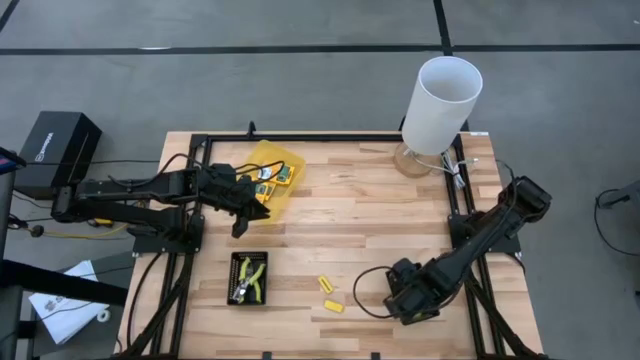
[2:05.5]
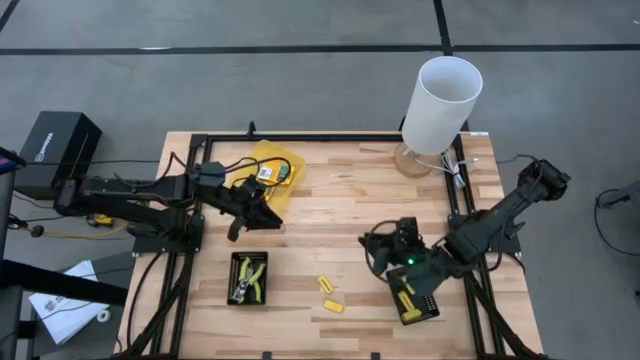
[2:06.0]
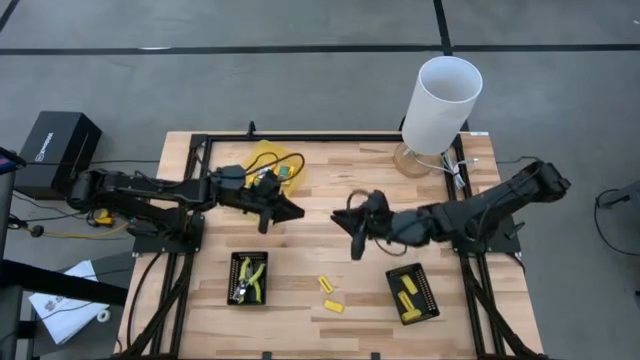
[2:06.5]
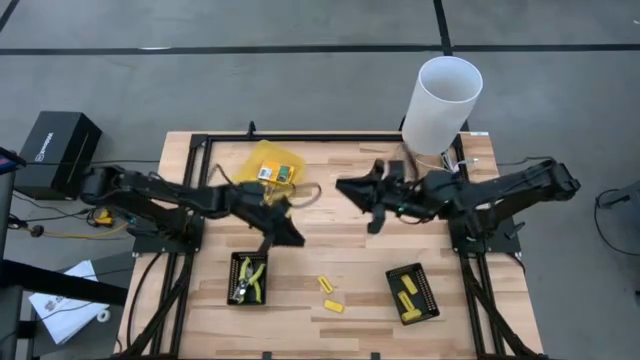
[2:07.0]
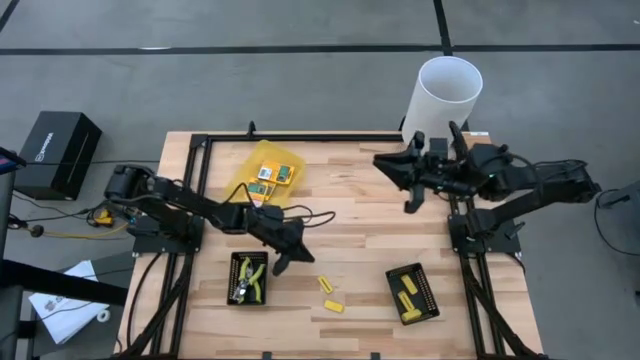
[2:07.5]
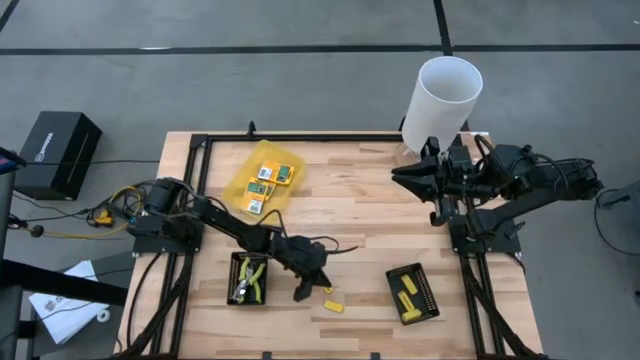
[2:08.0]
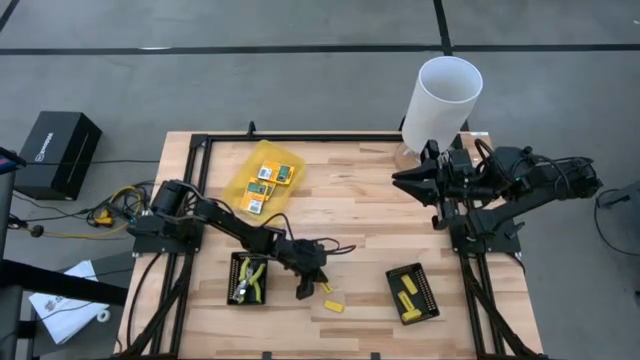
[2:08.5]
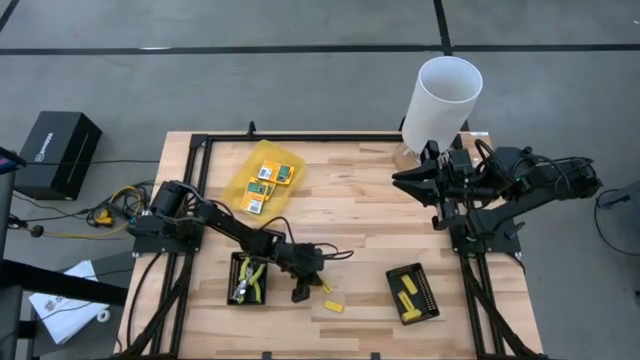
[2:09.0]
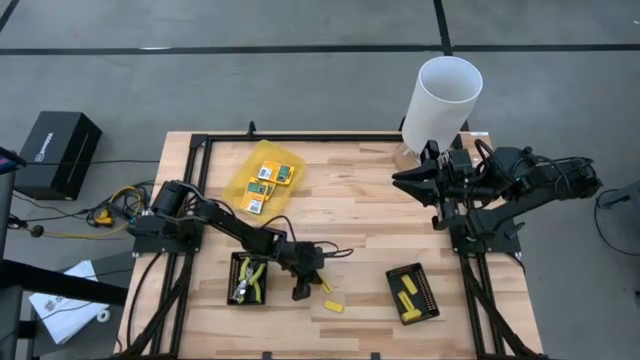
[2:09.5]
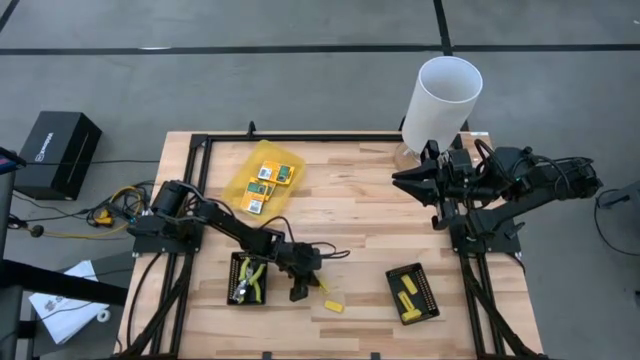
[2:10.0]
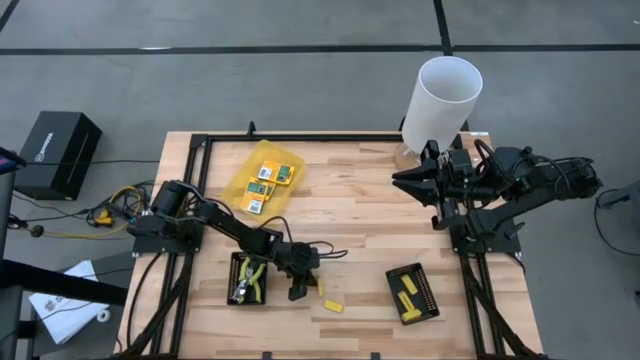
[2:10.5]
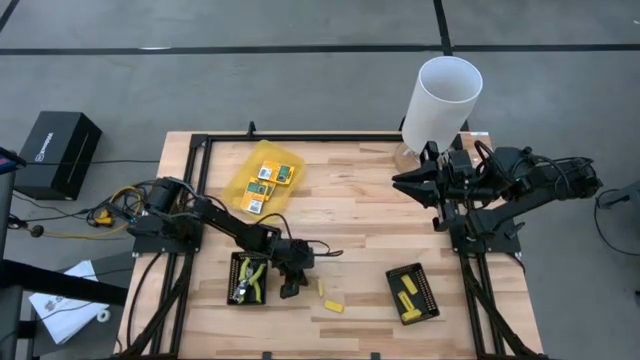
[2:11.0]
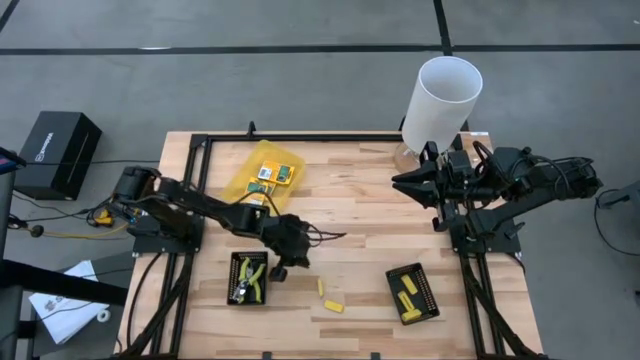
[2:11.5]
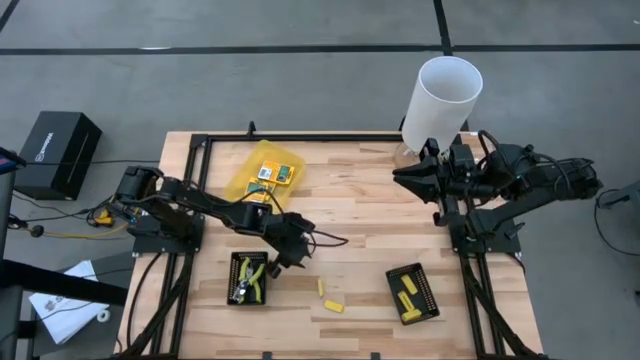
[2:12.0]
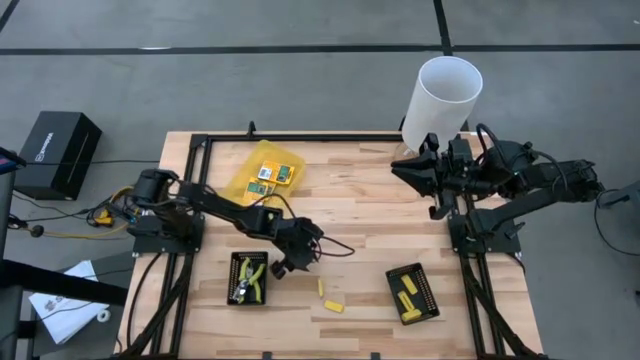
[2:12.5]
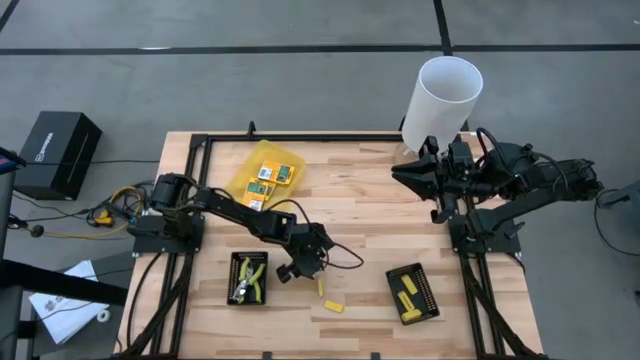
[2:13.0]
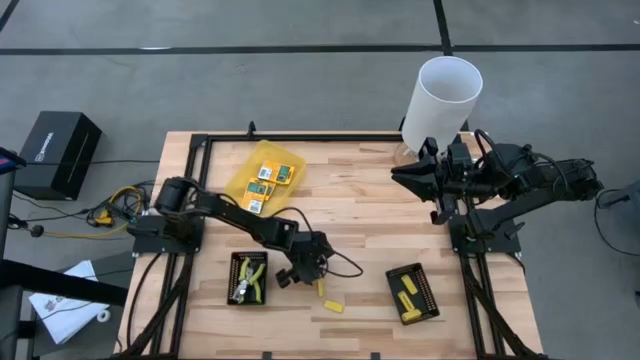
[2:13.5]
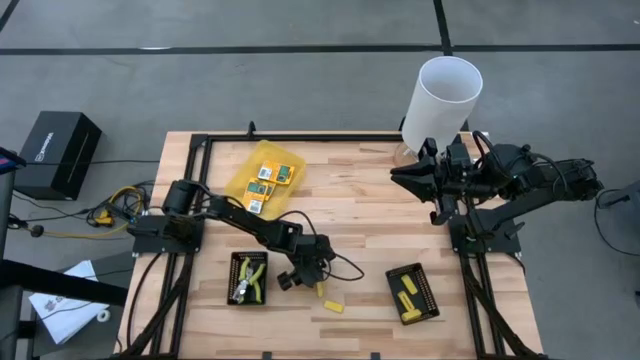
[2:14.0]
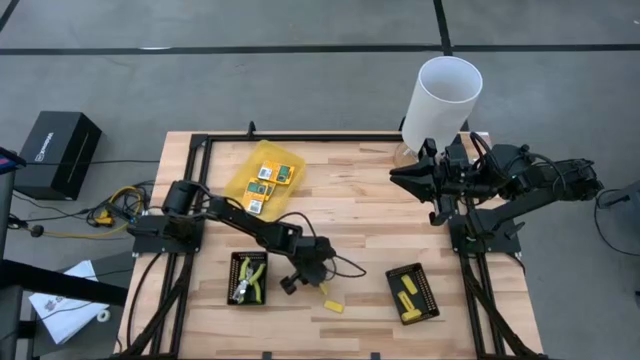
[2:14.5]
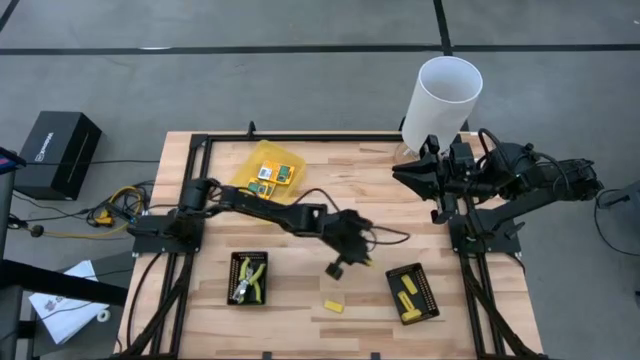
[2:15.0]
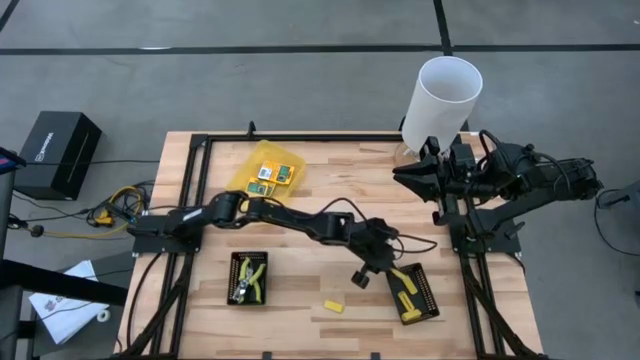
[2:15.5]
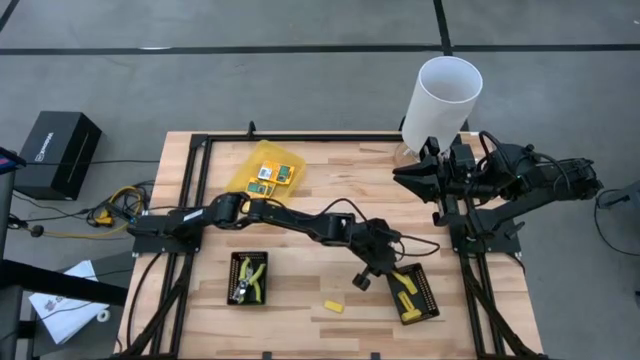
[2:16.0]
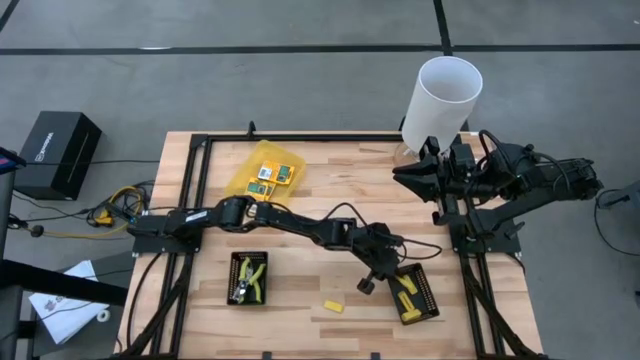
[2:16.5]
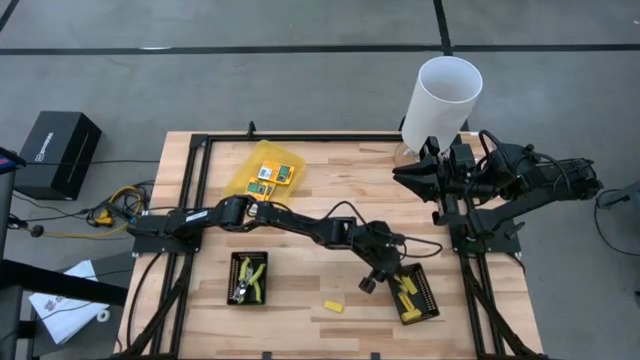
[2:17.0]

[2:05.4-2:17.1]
Task: Pick & Place School Supplies
Put the yellow eraser into the right black bin

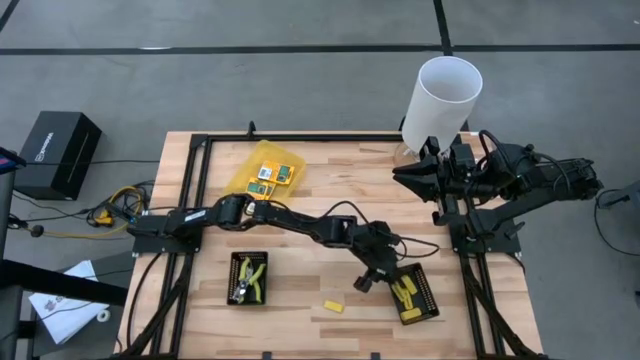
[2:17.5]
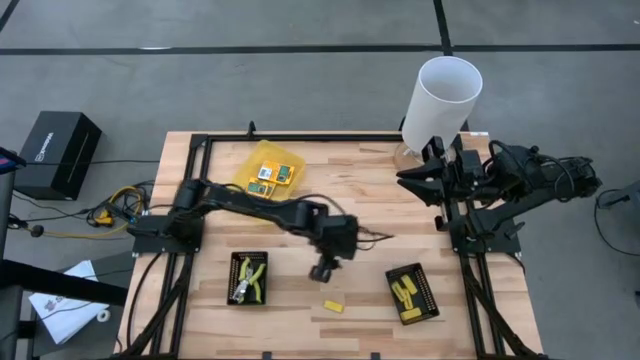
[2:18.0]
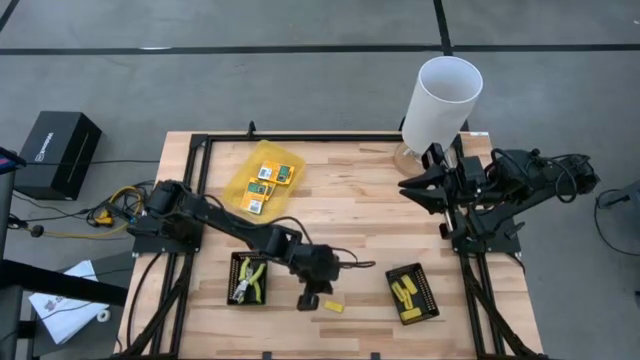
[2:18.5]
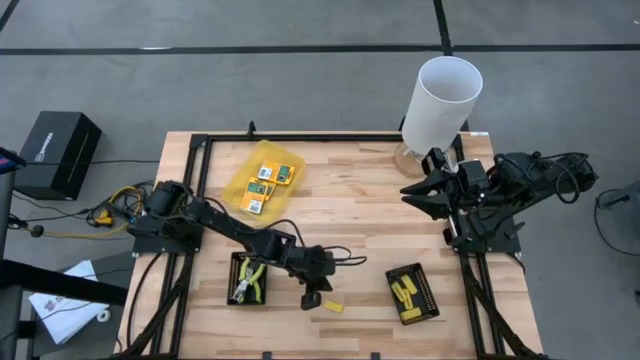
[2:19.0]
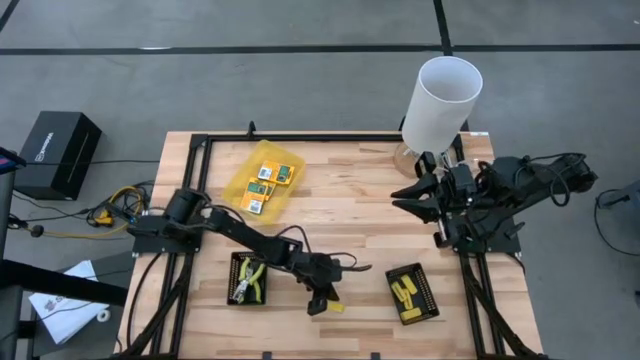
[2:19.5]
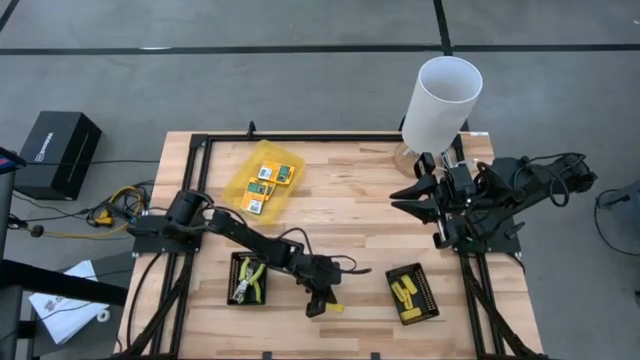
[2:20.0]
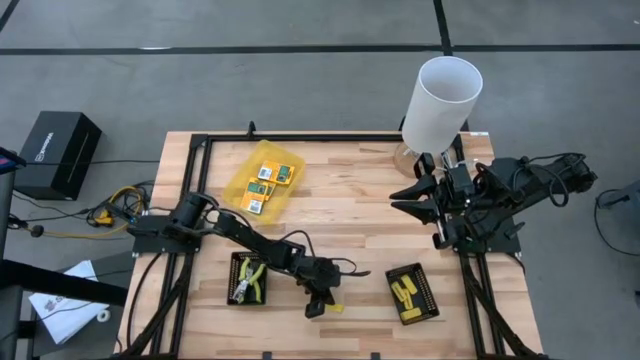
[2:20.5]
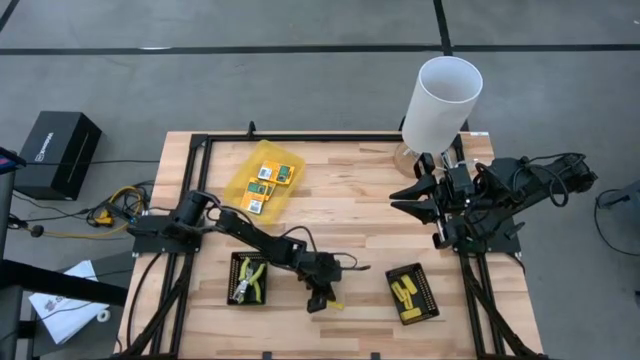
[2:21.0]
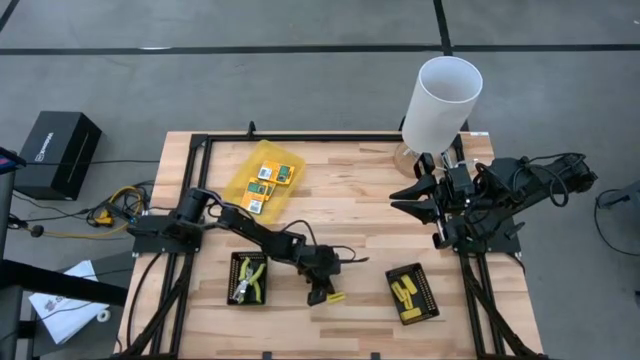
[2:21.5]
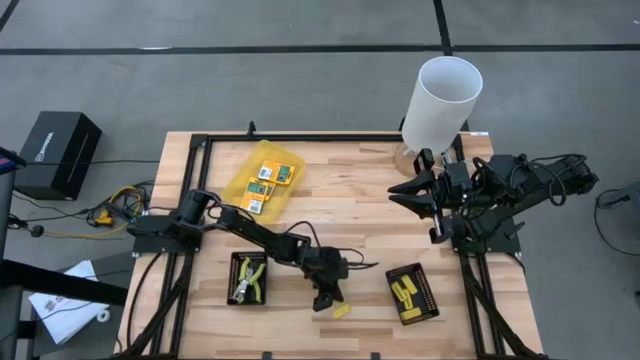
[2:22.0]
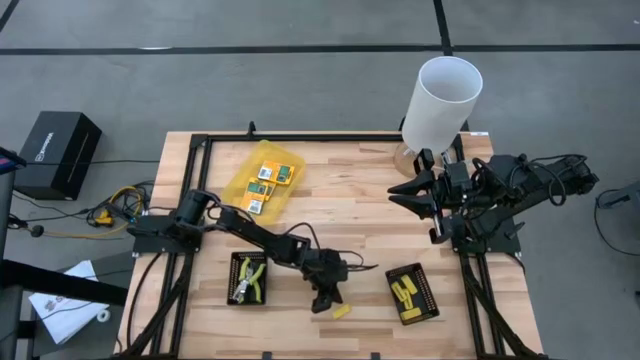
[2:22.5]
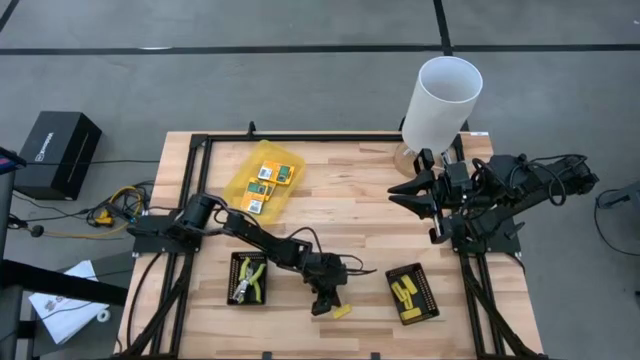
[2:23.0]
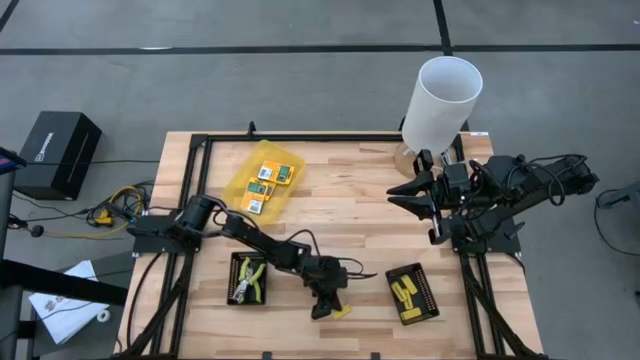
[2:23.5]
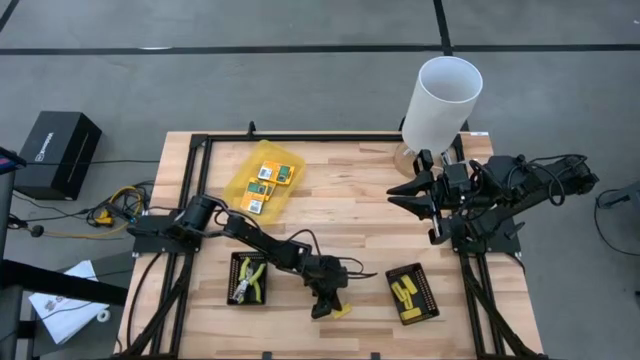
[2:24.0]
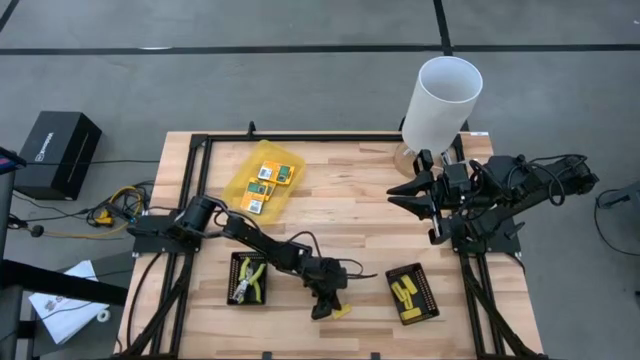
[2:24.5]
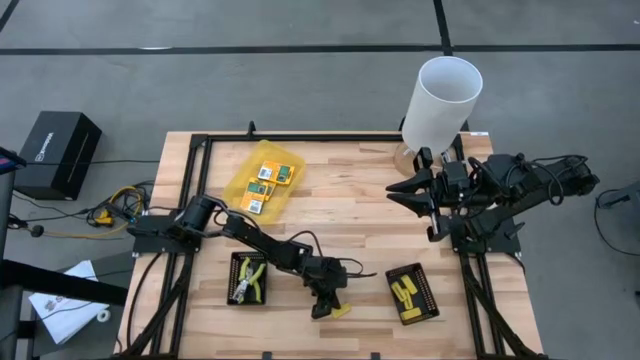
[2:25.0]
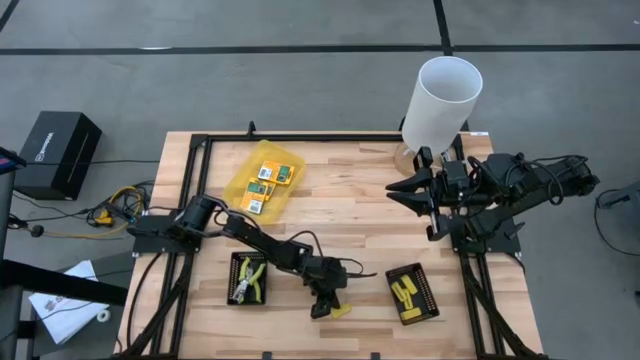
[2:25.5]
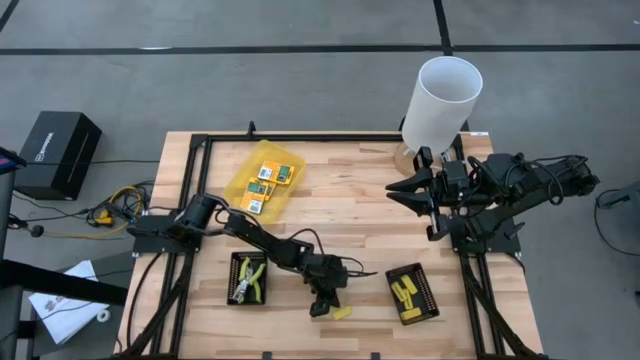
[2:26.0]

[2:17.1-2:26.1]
Put the yellow eraser into the right black bin
